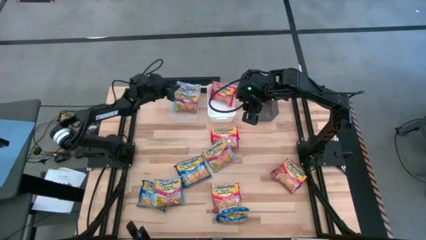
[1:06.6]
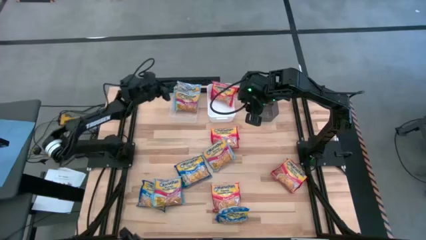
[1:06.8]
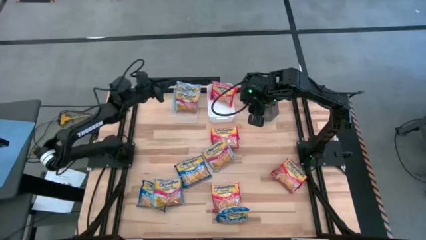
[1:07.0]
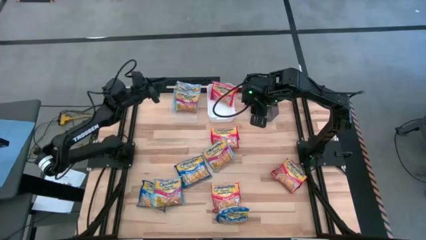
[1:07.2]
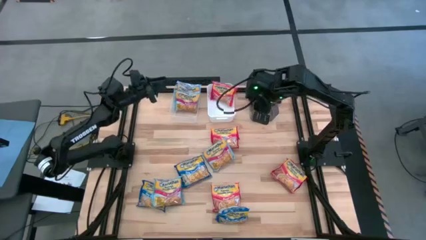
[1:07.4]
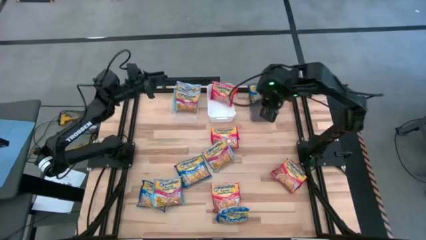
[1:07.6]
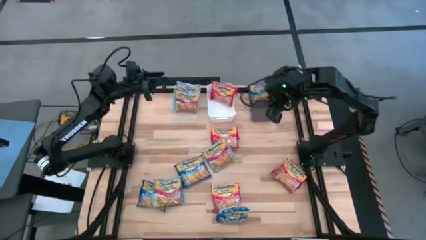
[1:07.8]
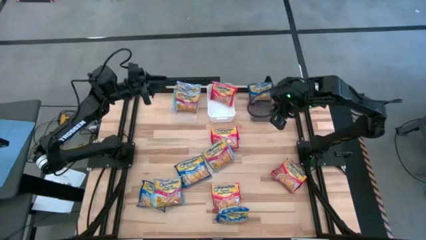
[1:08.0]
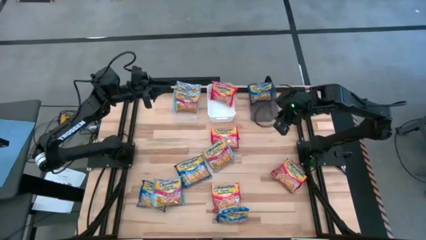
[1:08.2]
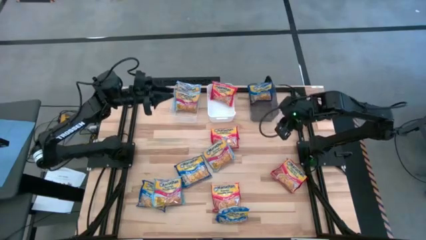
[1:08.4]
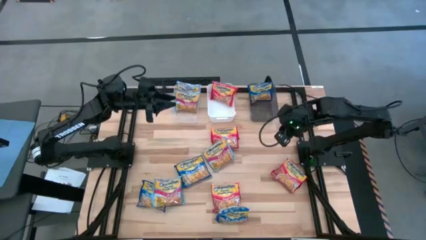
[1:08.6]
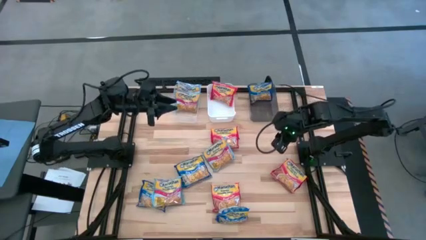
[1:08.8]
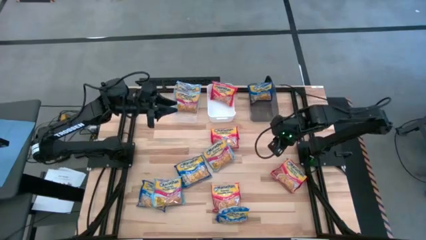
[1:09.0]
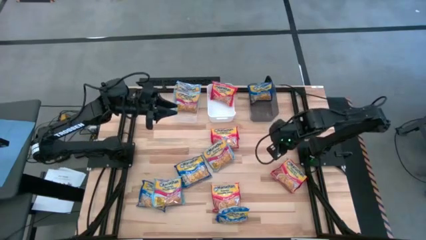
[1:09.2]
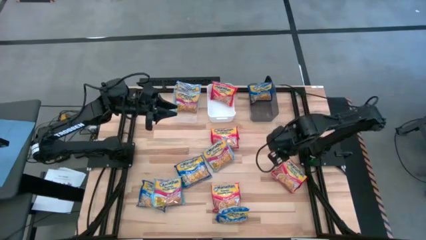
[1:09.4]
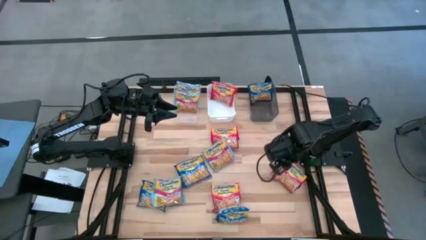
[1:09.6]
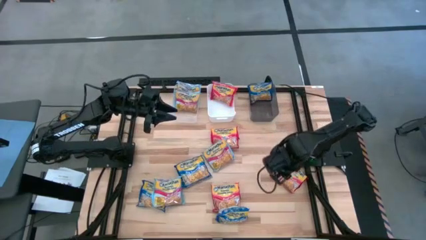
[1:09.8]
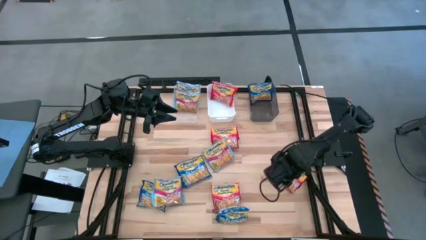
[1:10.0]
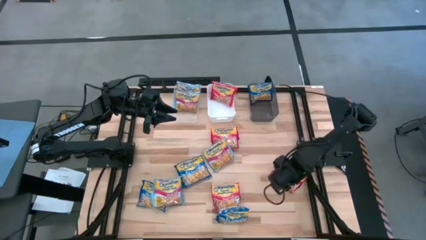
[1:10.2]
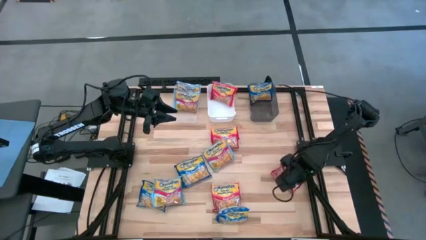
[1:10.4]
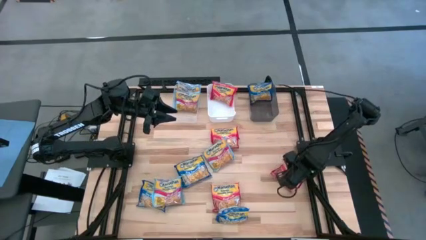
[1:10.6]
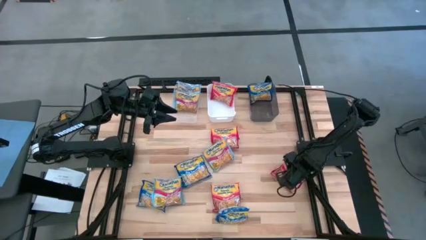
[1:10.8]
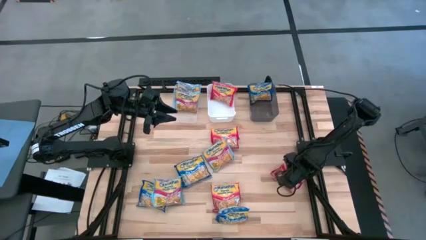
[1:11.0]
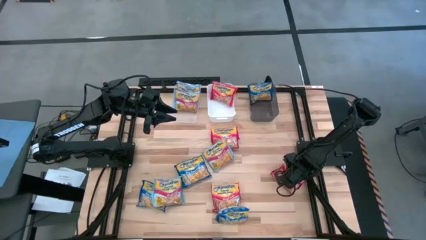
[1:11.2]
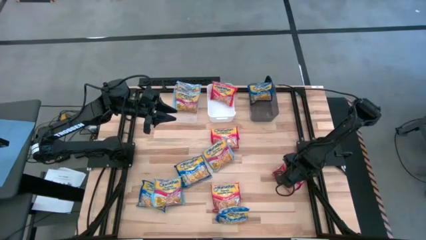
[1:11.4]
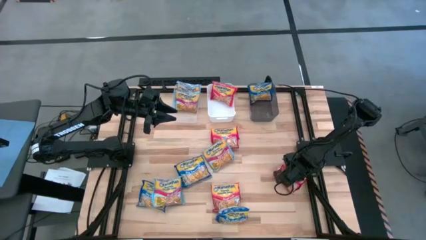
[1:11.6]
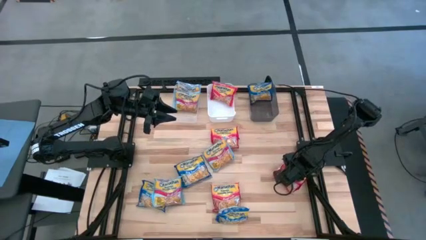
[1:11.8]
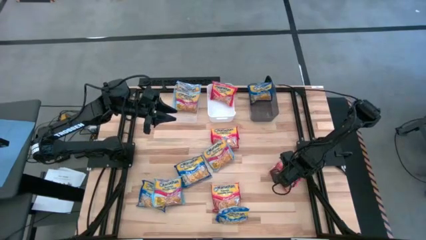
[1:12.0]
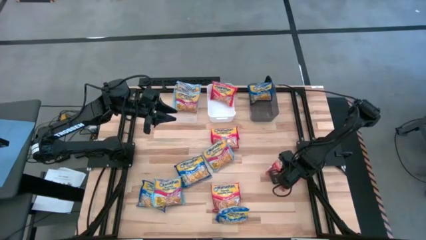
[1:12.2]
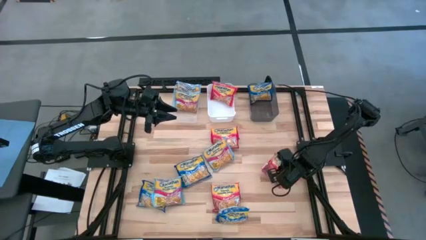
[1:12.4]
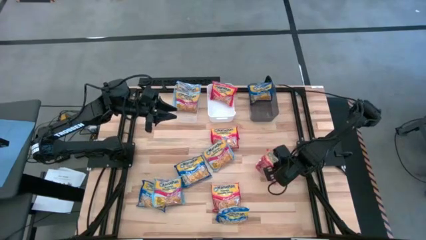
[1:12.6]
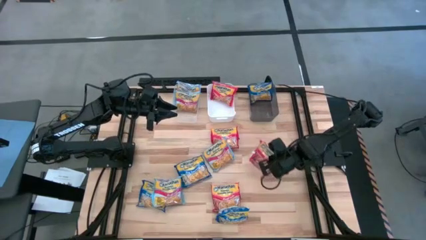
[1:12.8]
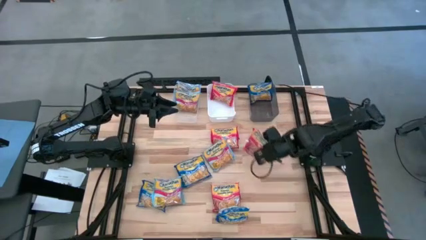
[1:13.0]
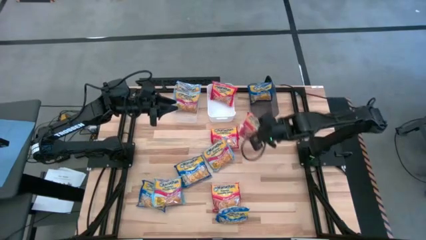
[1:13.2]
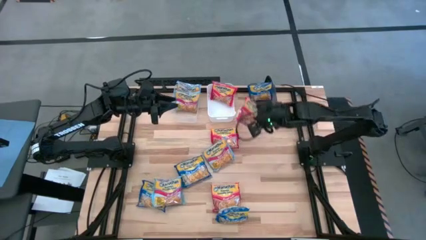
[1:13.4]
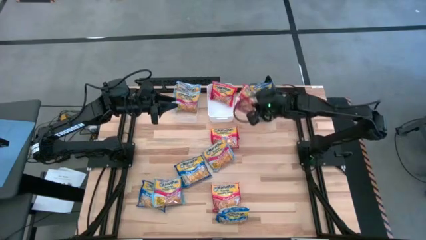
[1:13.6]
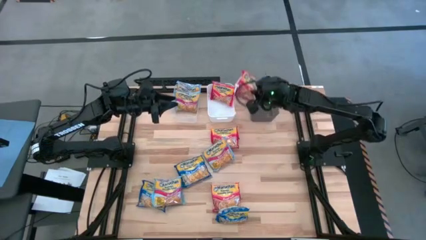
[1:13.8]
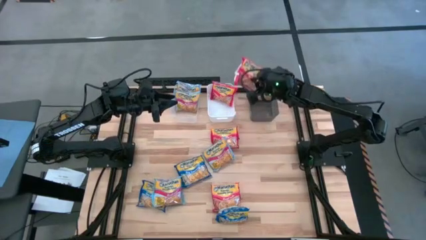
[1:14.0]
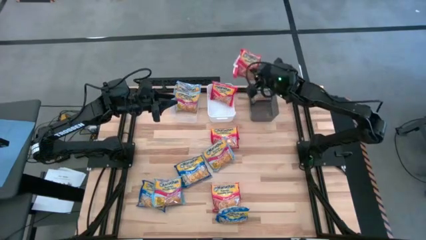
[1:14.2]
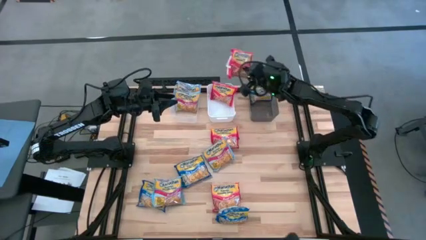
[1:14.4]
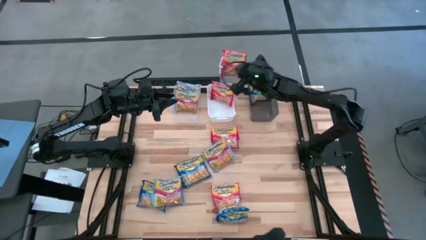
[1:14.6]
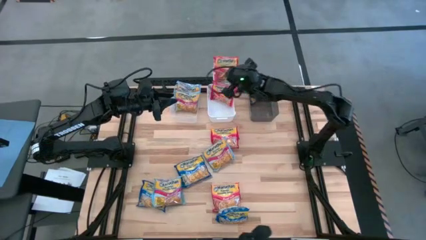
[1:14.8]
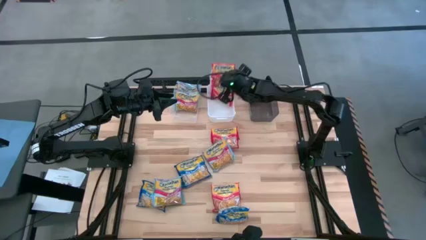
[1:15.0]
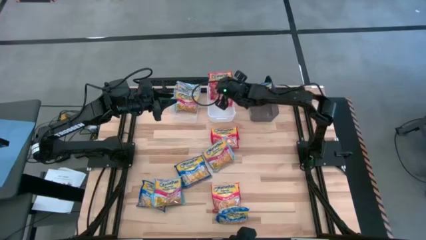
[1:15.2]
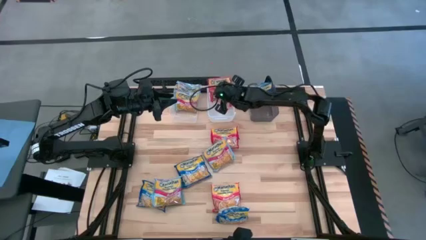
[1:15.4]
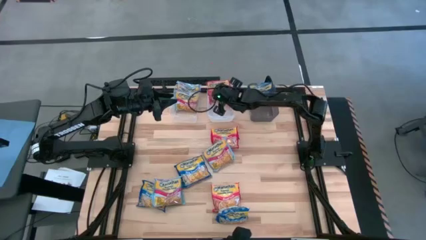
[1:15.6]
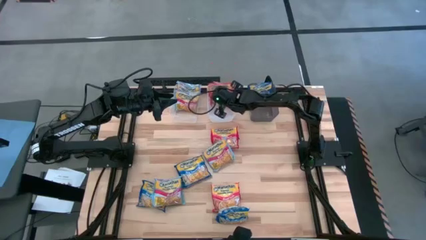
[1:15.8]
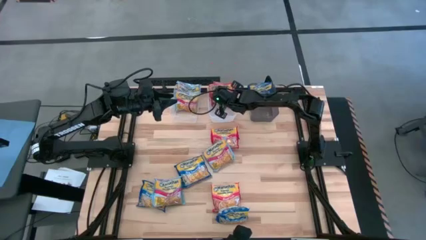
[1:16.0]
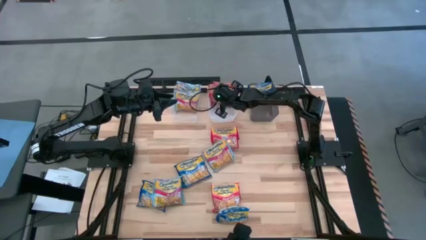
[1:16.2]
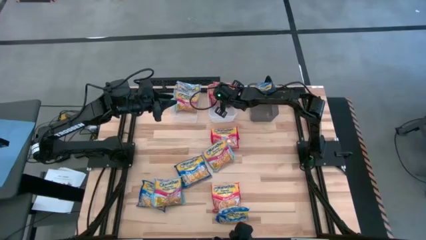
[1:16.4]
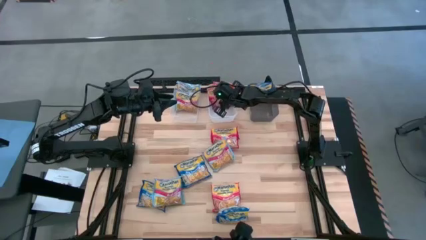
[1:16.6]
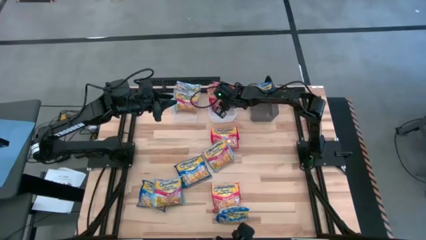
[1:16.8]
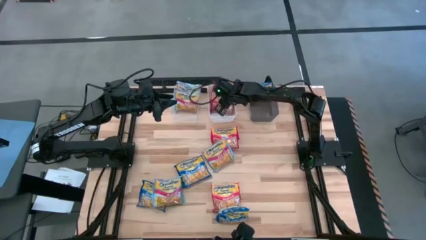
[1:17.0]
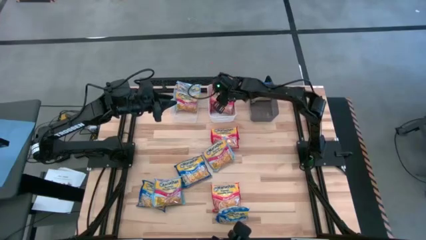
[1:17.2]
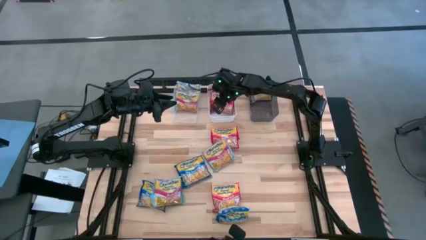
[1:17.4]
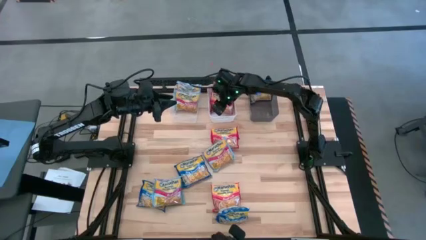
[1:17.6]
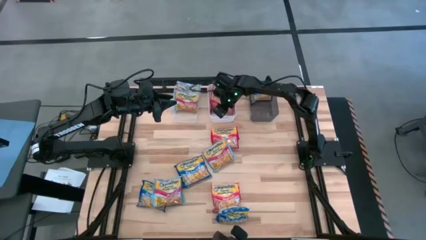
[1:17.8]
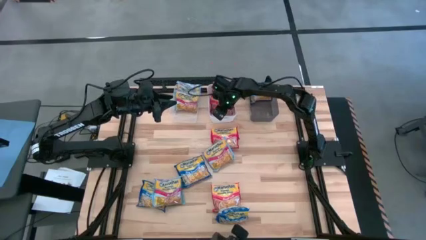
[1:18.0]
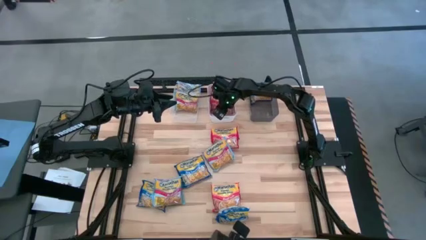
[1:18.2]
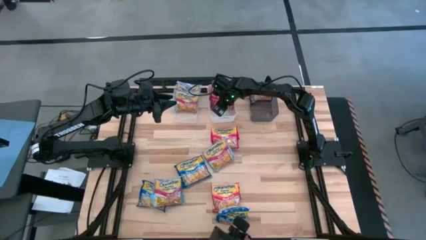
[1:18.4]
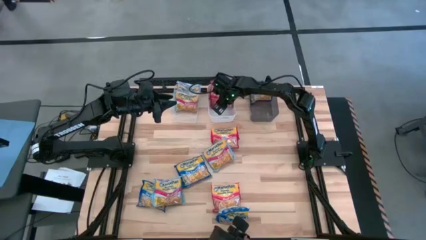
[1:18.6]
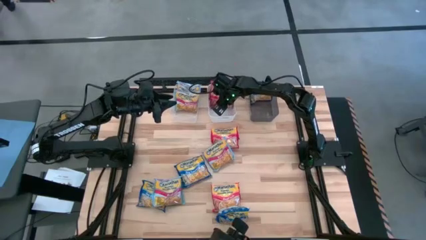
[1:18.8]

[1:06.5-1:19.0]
Task: Sort Maruchan noodles
Put the orange bag into the white bin
